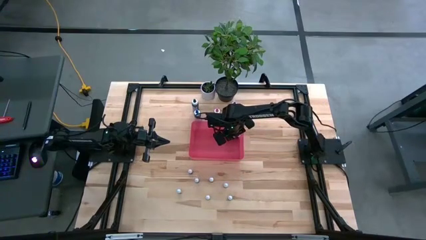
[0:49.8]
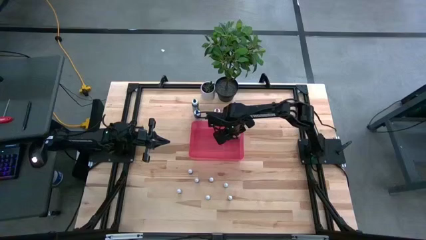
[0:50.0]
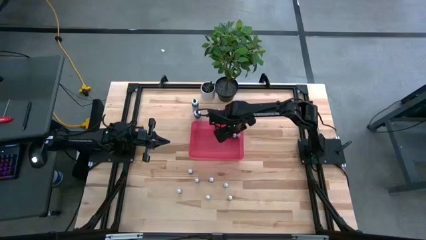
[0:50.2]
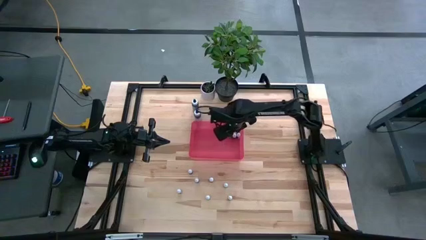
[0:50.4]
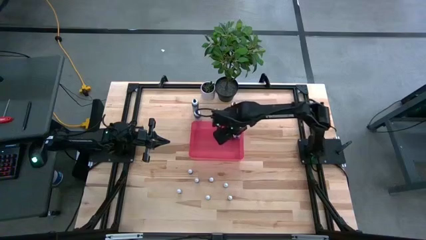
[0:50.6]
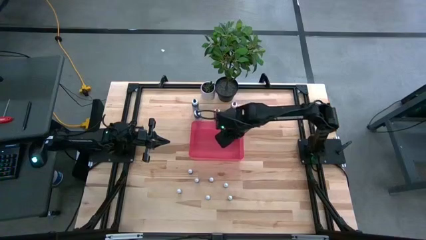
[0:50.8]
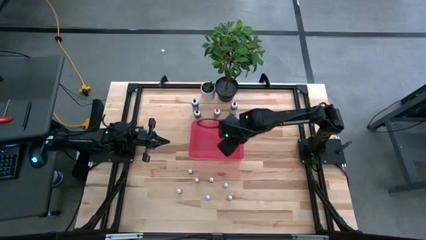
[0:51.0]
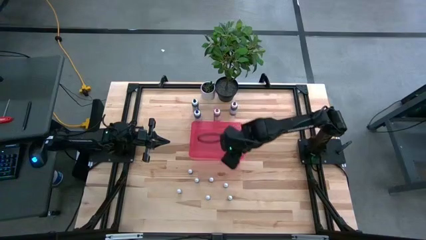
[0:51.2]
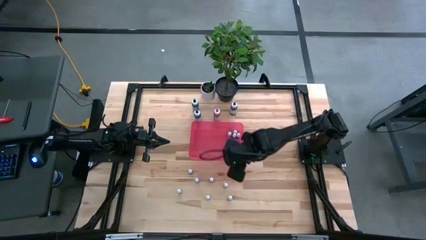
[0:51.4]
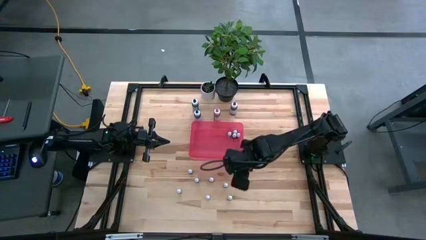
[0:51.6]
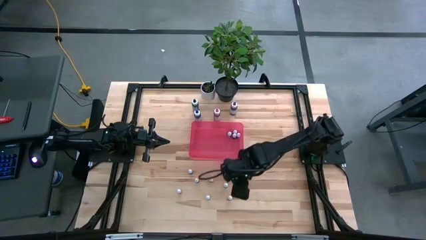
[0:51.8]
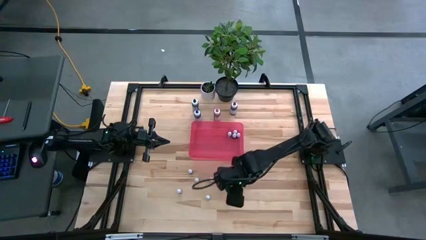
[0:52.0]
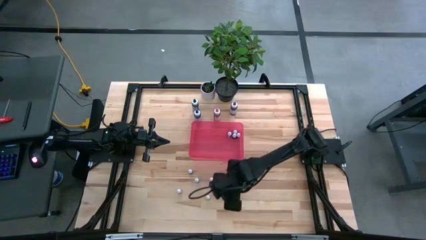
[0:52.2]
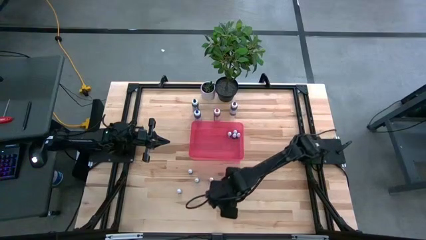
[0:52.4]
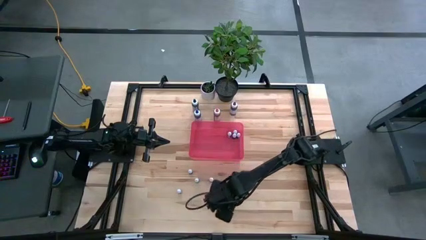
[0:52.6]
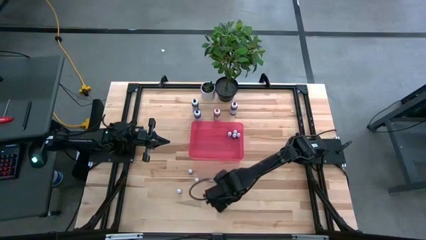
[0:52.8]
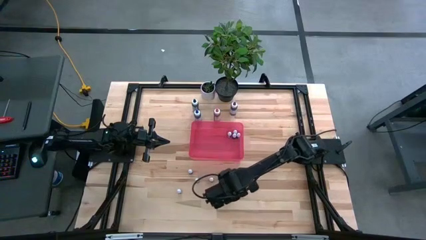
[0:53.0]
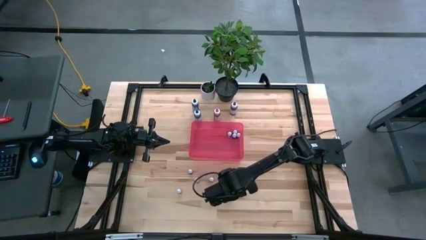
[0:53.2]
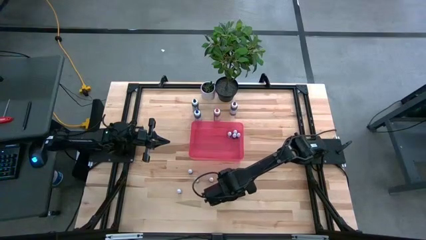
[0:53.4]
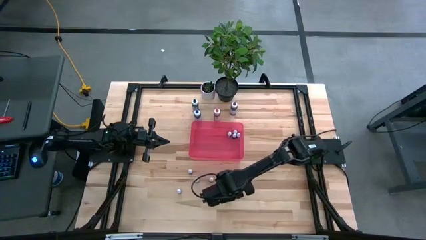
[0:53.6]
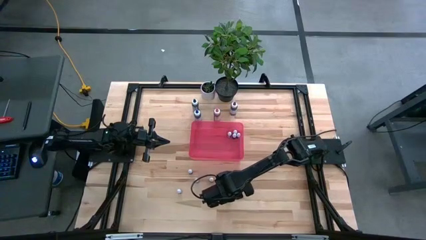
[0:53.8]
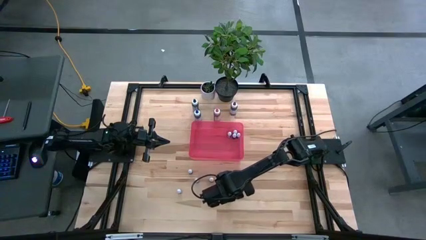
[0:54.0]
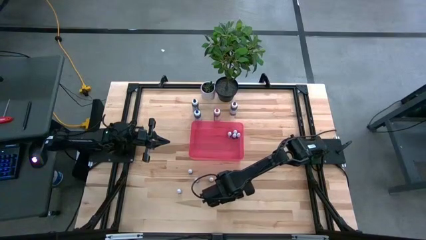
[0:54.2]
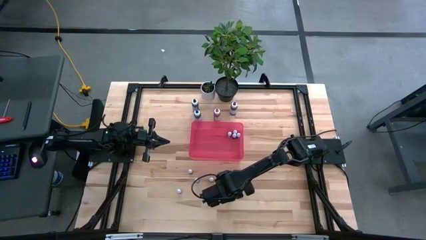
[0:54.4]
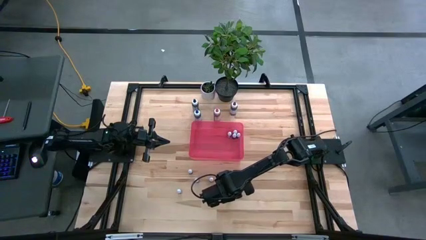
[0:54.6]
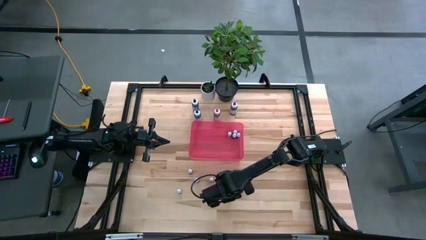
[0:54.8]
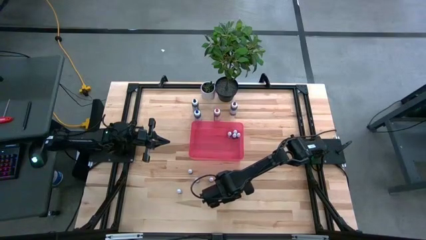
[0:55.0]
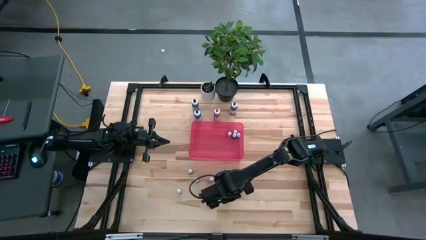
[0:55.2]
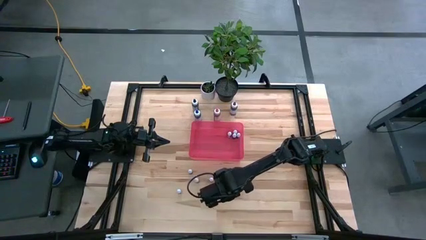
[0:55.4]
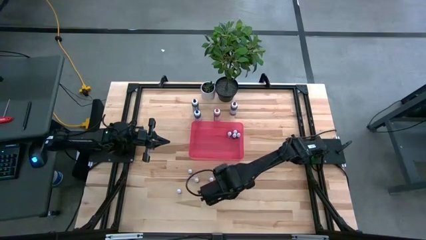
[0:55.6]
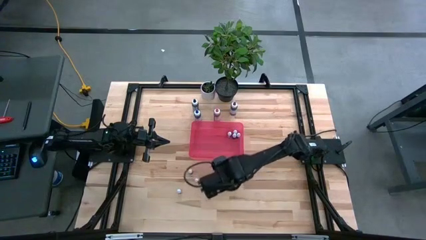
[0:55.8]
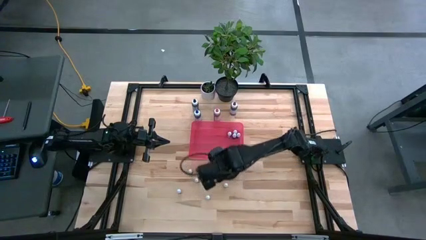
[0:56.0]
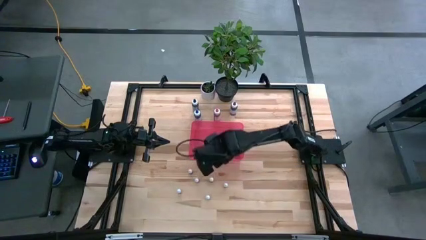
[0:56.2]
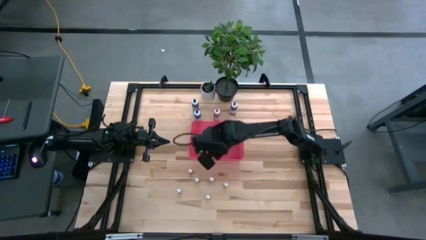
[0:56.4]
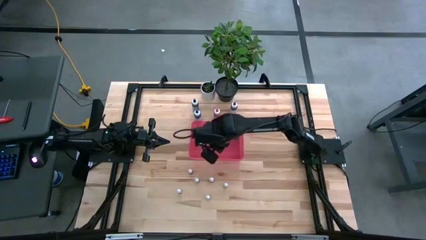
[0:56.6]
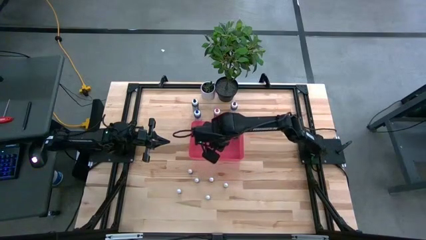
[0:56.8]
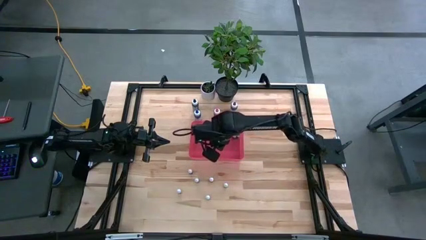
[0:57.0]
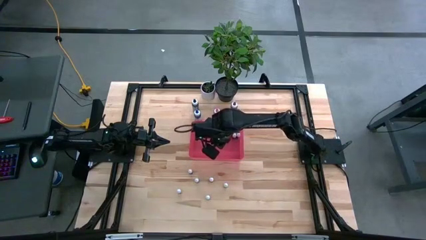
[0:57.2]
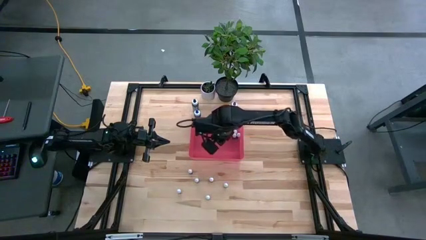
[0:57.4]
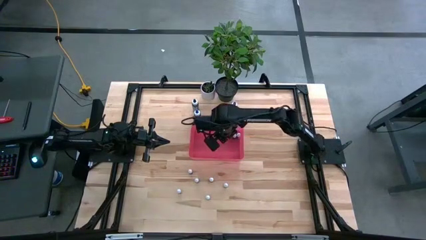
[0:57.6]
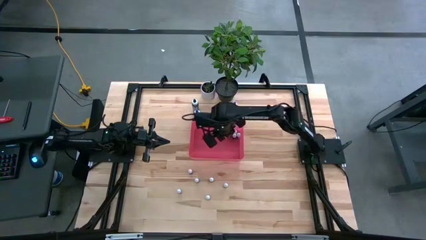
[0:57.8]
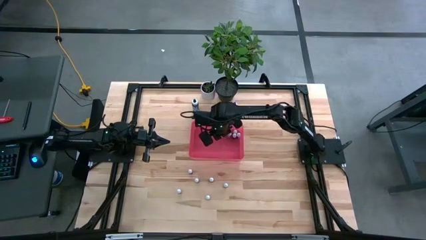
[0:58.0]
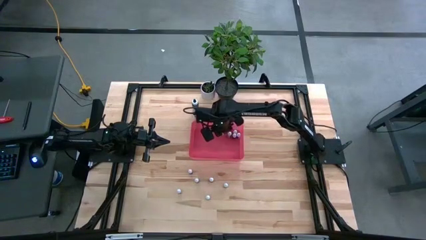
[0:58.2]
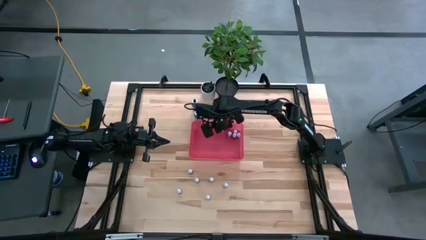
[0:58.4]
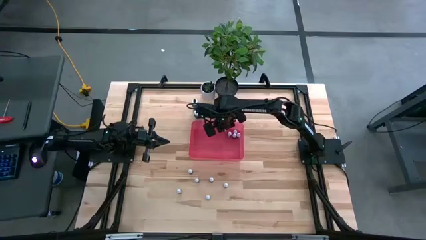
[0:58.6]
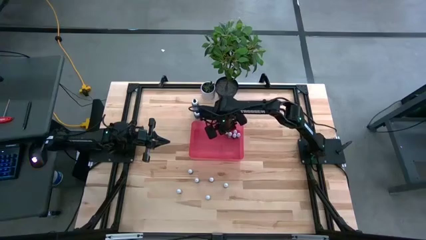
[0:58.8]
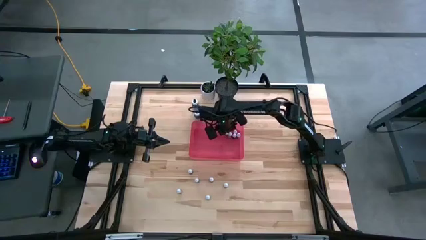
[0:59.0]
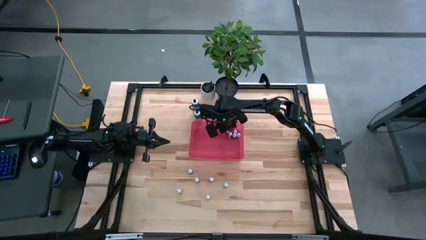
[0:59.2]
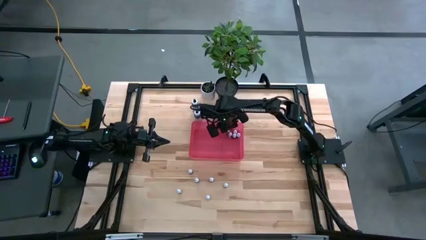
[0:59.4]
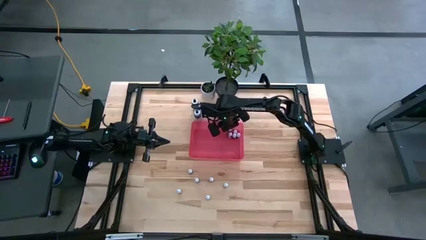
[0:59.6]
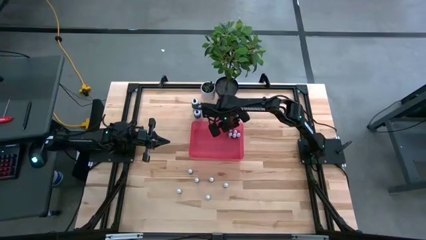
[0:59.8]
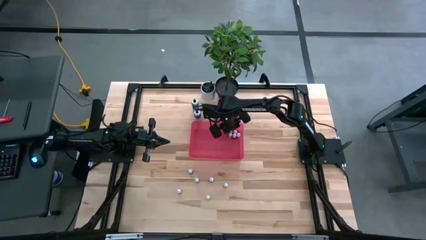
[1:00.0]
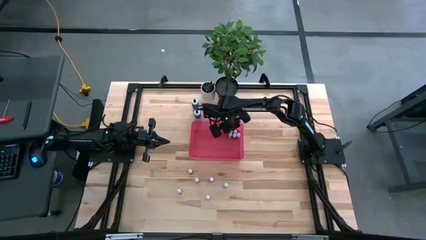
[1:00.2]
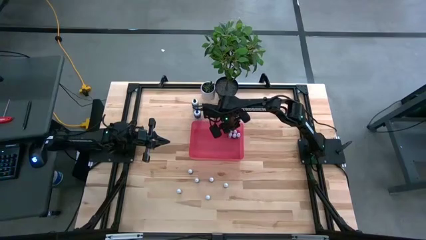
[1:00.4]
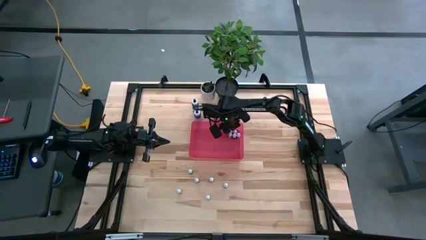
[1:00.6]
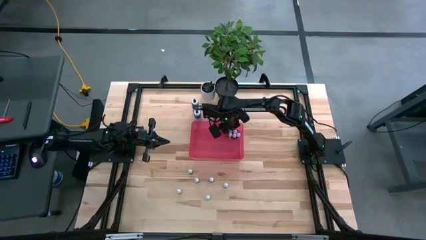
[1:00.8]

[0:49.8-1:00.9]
Task: Pick & Place food coloring
Put the small black food coloring bottle into the pink container
